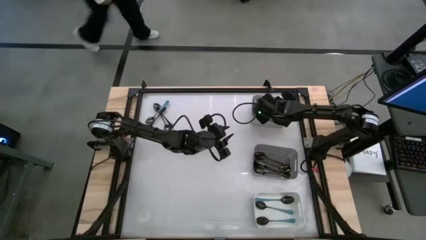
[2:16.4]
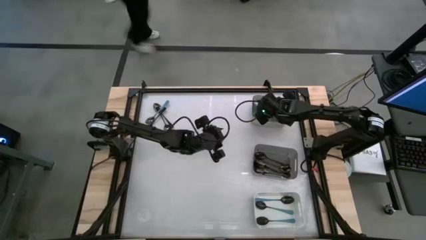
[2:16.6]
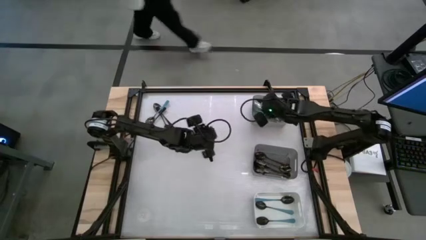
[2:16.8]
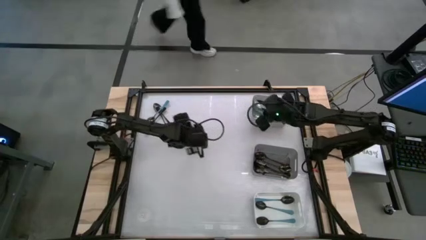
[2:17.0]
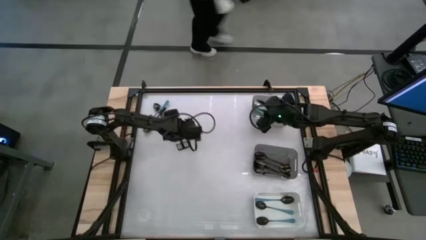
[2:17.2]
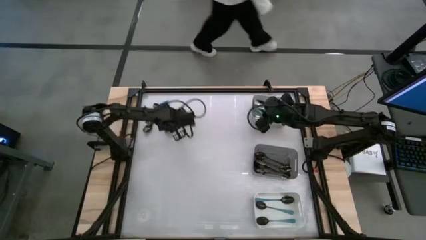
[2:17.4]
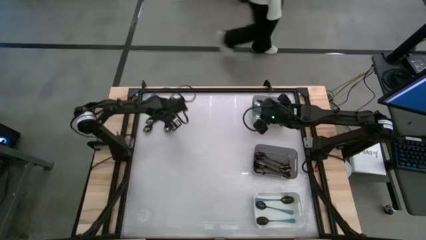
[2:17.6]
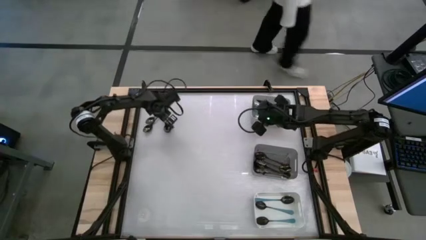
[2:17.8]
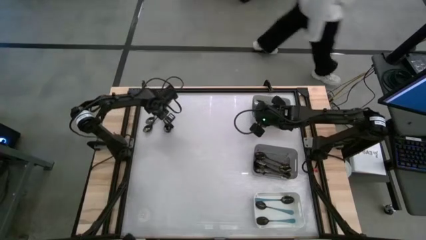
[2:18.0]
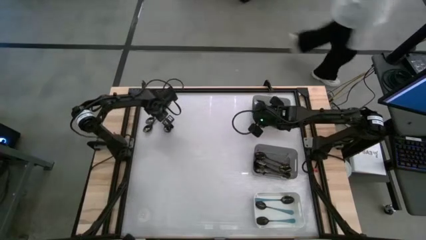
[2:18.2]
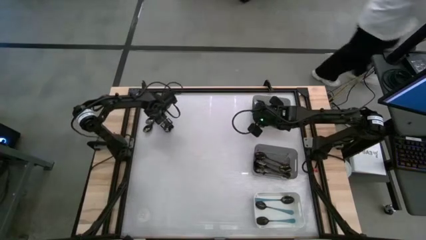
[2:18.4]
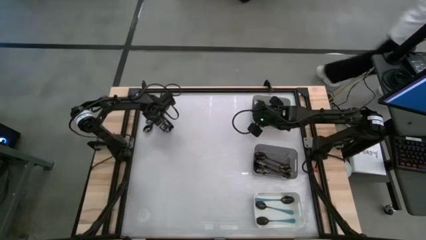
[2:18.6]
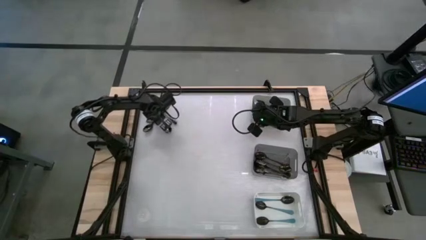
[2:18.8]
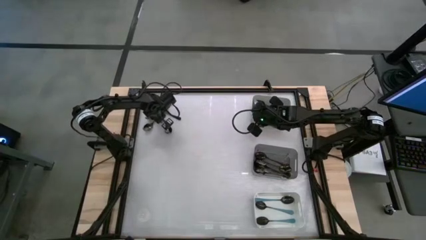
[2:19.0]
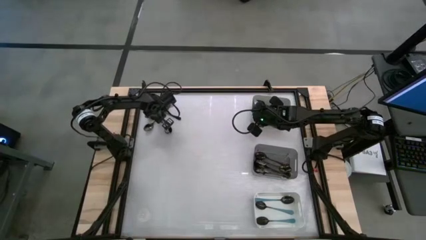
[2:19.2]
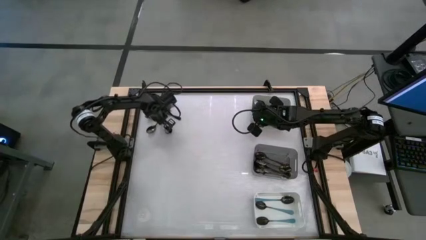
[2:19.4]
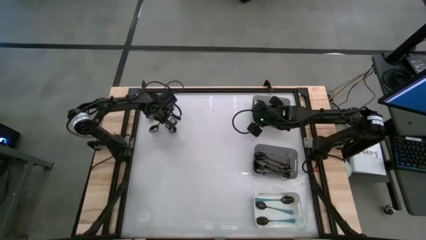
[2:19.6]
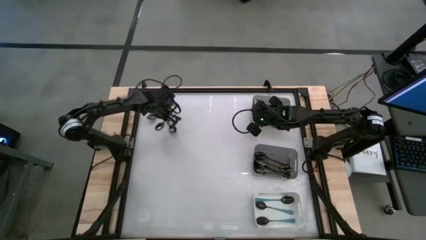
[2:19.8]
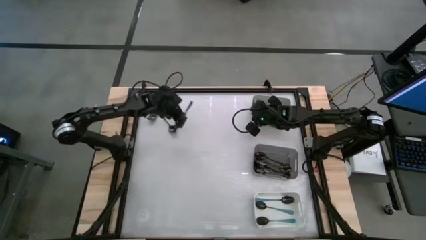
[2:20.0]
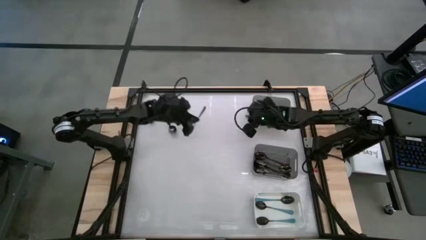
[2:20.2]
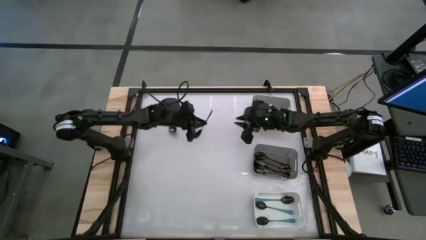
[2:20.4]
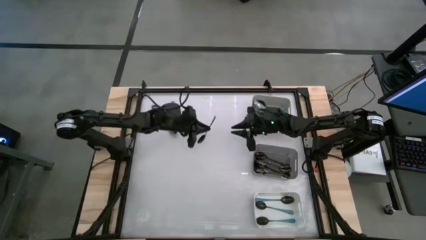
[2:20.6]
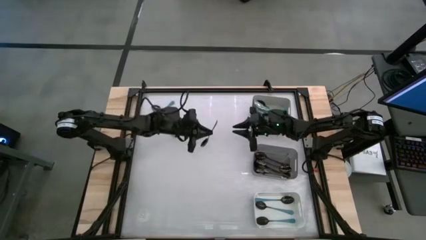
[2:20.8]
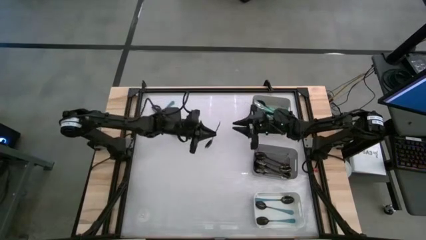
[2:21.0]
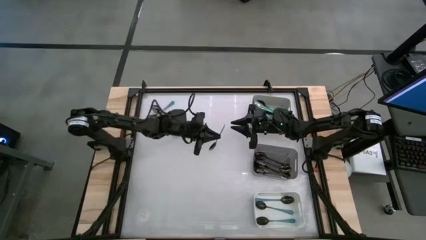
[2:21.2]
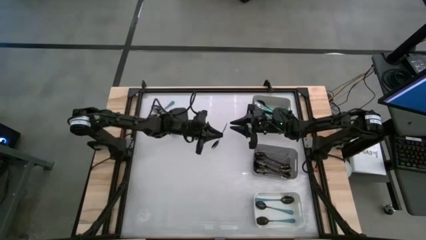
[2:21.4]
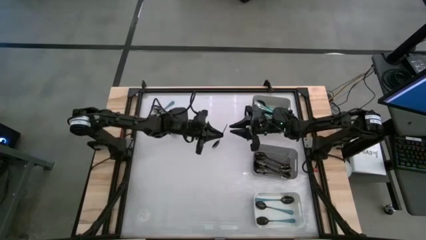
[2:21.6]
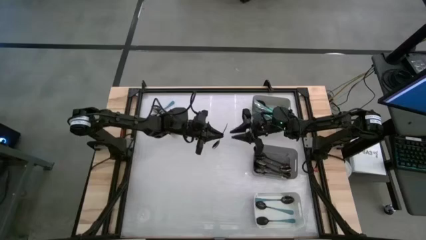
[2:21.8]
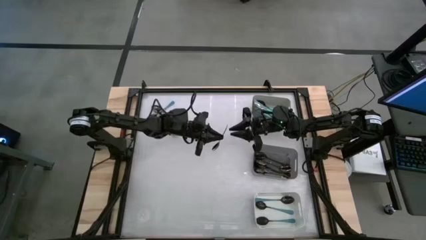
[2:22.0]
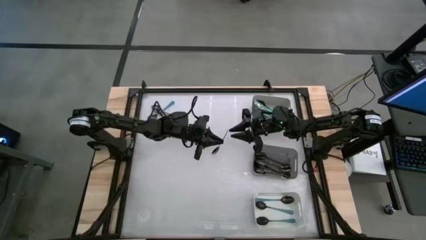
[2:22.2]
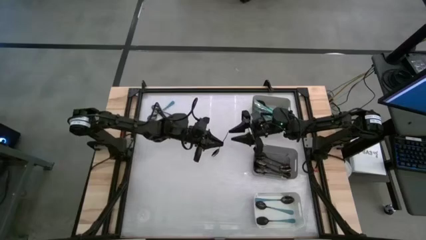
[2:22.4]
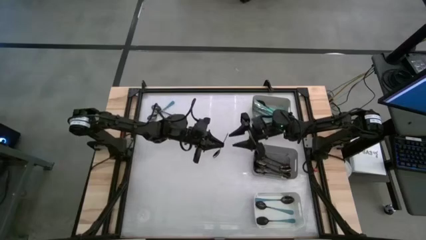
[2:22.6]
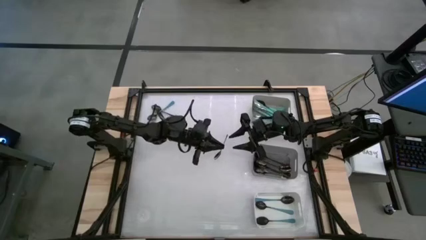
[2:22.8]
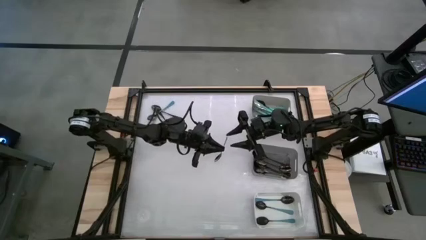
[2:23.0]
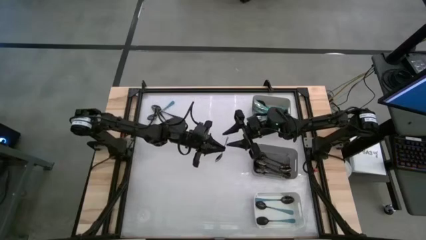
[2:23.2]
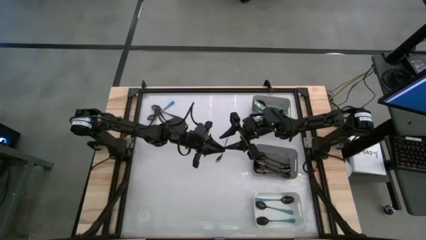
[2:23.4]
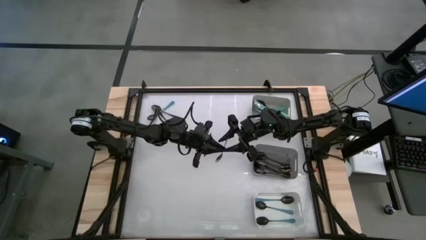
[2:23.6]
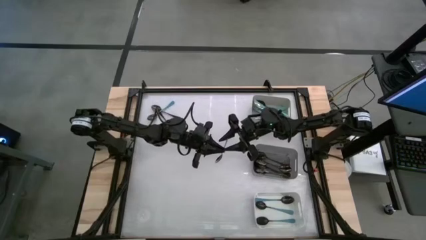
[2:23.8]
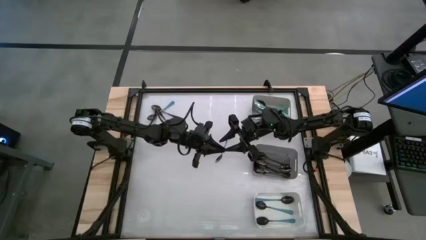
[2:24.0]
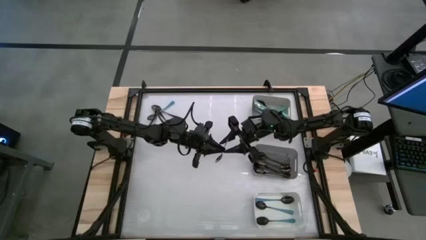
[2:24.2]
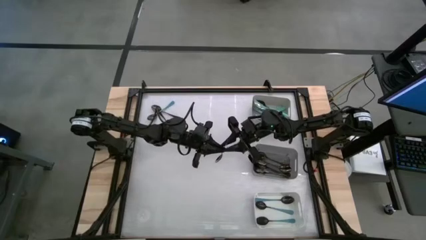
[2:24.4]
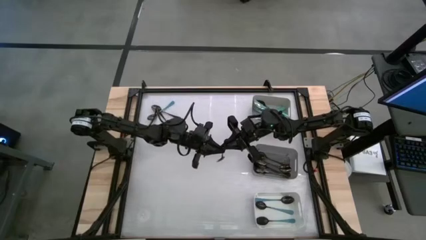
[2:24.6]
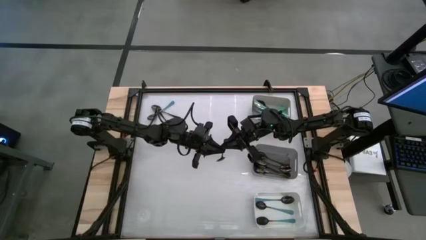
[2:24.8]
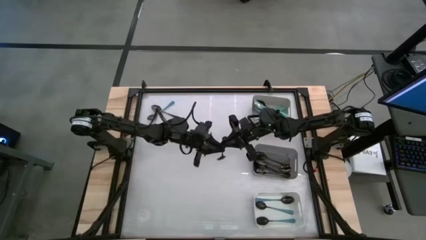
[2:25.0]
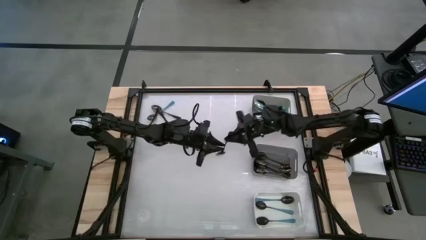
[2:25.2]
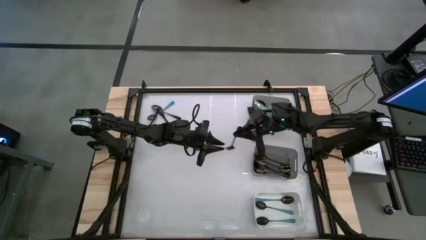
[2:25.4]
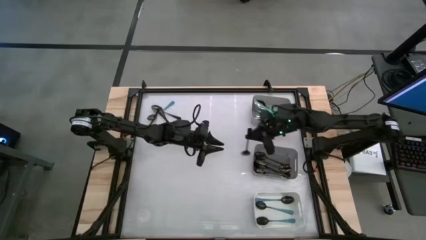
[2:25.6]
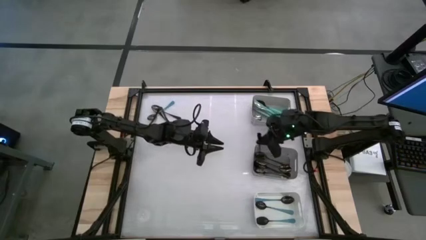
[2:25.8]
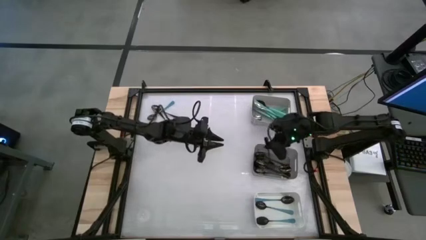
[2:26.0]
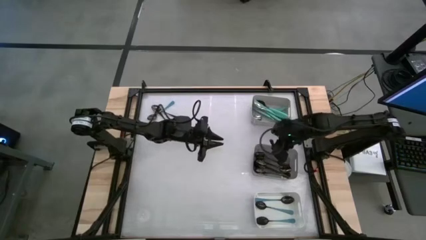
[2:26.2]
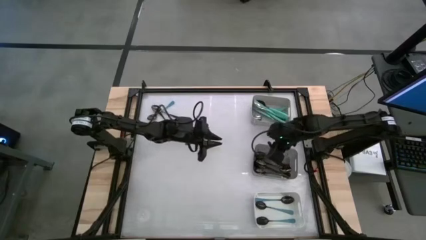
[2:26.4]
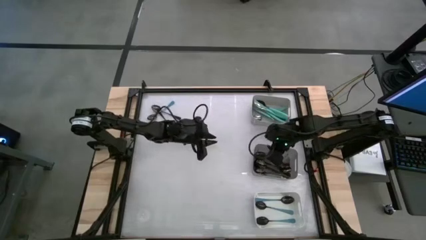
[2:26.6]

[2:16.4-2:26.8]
Task: Sort silverware by color (type)
Put the black spoon into the black bin

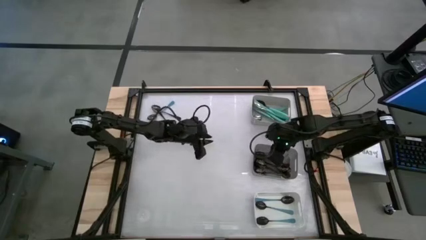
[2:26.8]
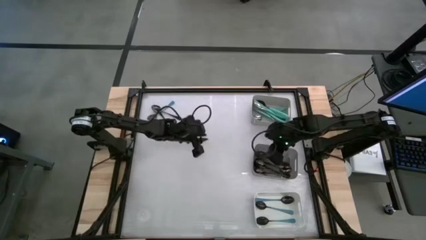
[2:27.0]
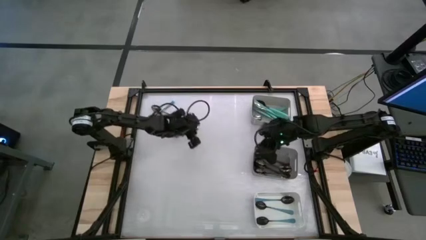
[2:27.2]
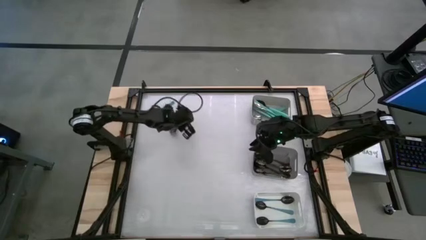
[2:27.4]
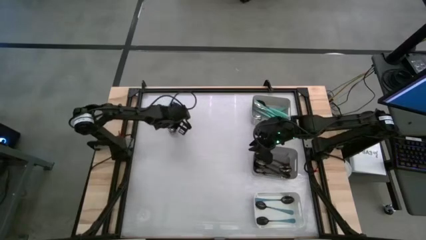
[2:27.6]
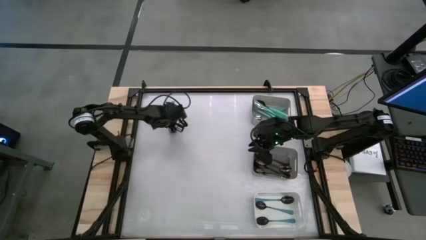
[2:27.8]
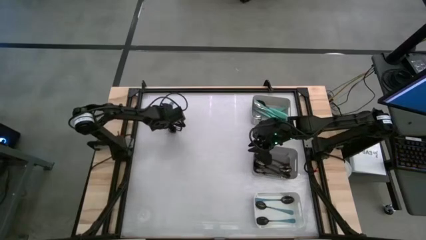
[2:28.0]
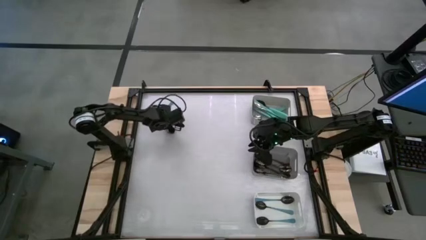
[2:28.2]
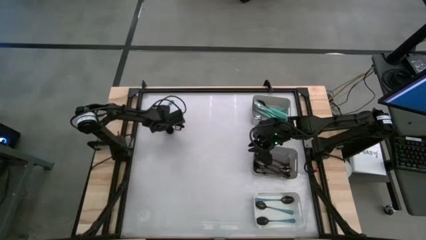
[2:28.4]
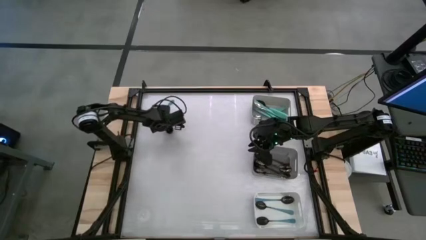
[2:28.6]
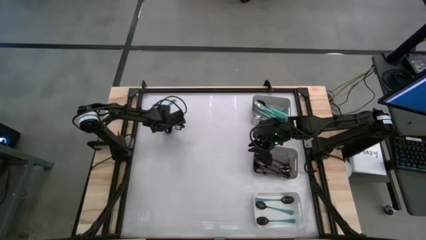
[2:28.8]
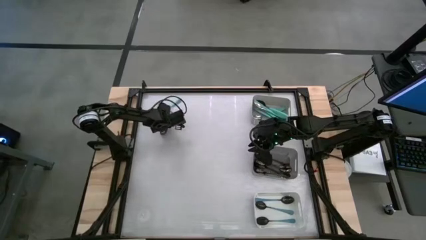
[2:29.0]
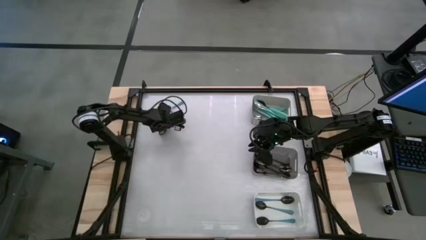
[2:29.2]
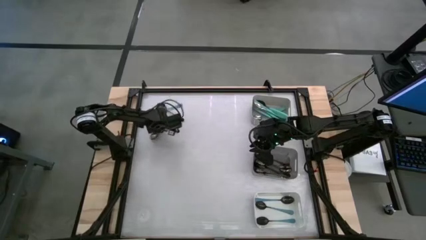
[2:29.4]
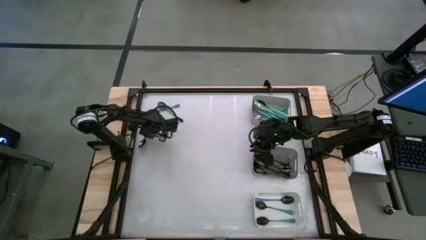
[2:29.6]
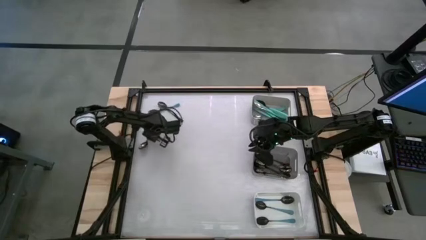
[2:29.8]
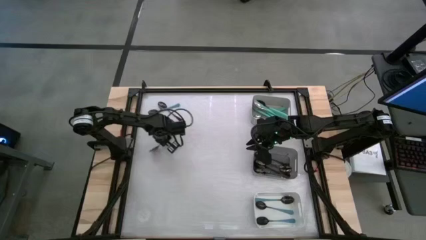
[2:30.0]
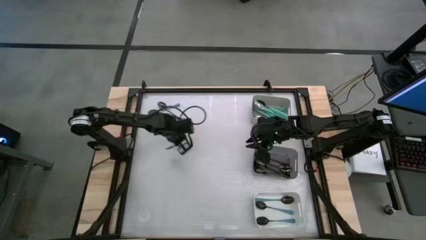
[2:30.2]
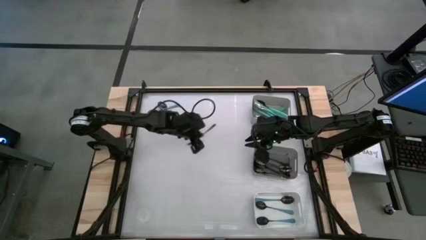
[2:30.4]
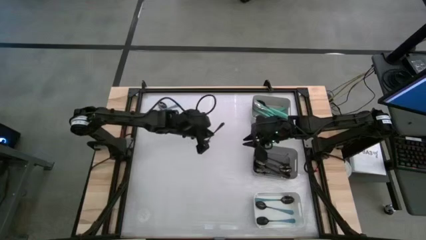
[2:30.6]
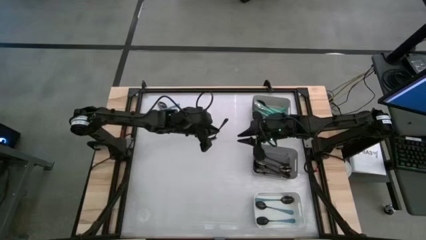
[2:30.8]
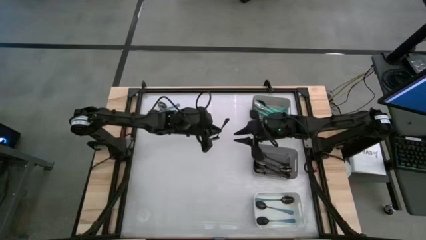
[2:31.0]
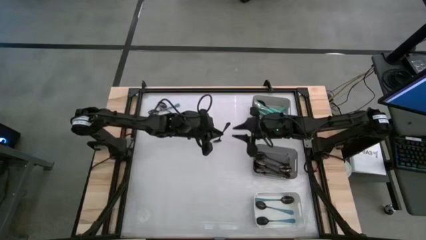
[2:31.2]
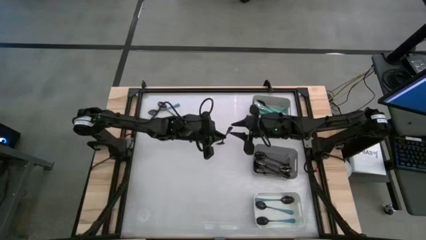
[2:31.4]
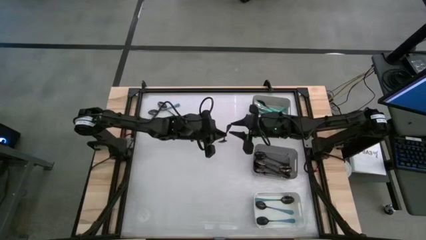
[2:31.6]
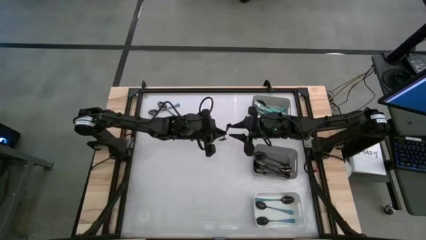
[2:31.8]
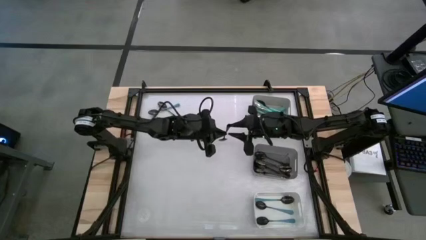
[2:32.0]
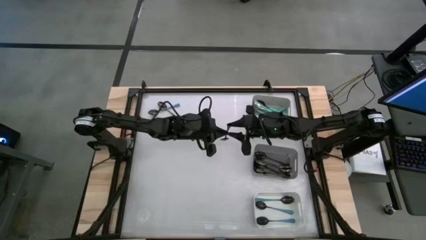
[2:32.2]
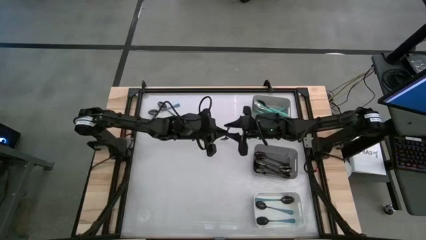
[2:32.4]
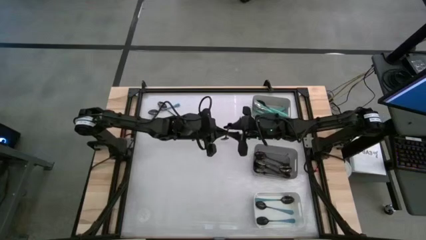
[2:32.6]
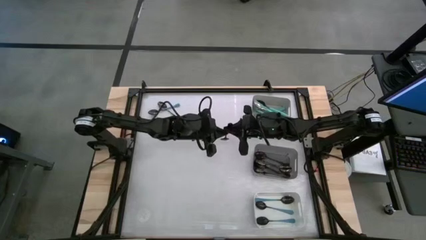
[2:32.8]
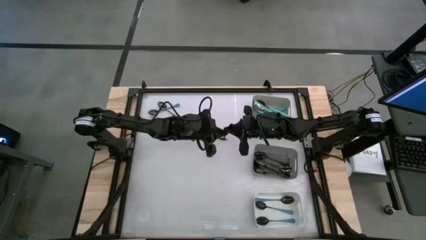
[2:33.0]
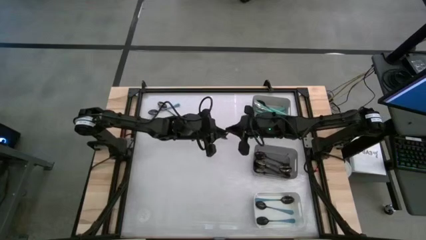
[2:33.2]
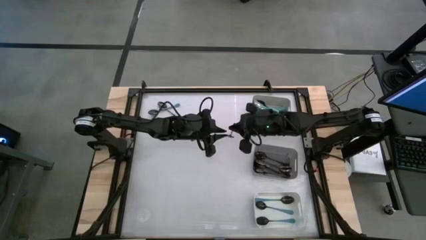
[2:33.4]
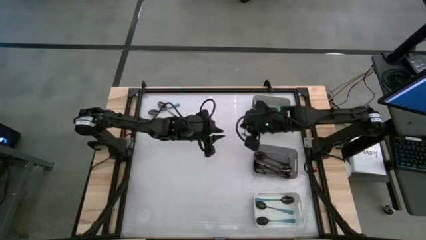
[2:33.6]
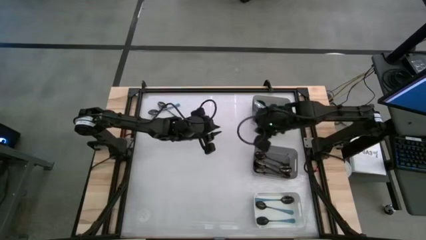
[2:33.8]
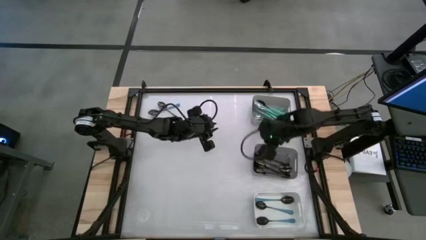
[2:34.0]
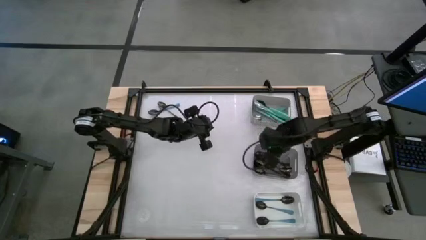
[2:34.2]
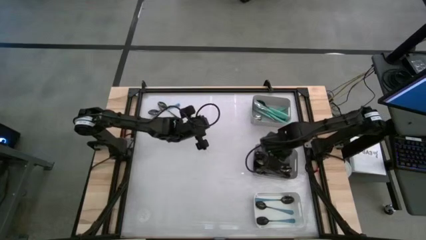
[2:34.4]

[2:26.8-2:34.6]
Put the black spoon into the black bin
